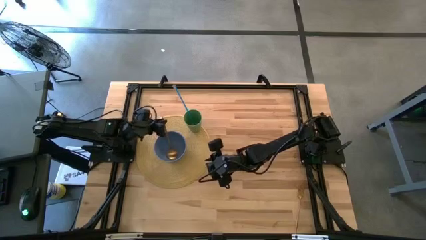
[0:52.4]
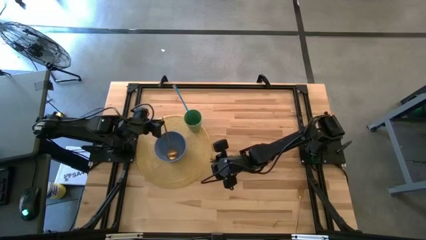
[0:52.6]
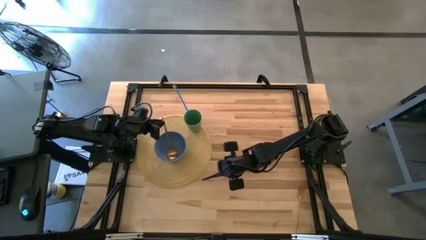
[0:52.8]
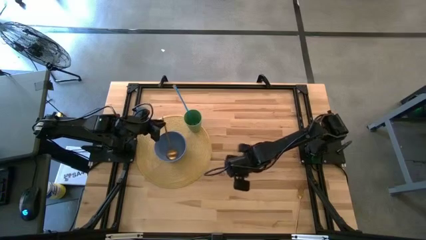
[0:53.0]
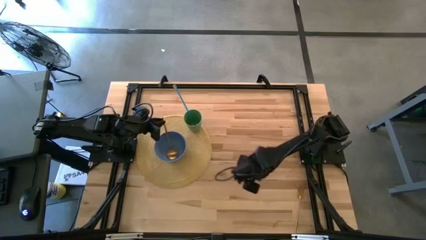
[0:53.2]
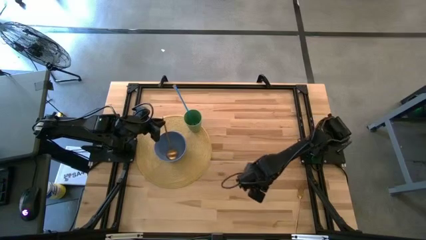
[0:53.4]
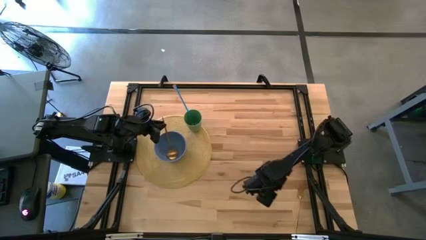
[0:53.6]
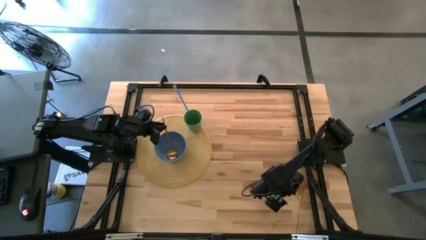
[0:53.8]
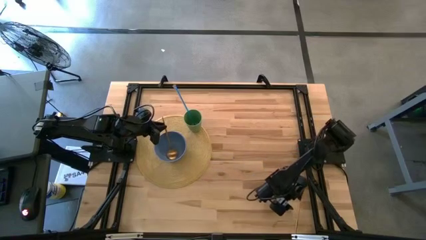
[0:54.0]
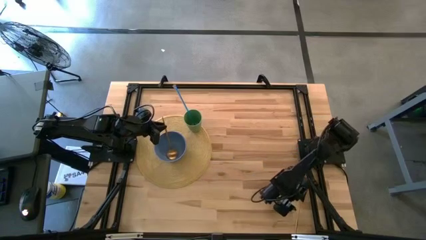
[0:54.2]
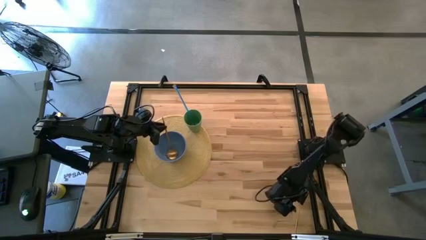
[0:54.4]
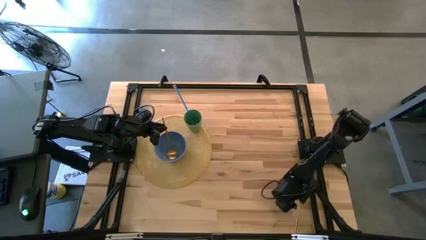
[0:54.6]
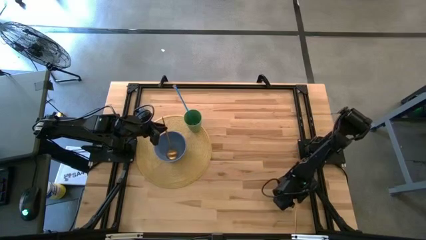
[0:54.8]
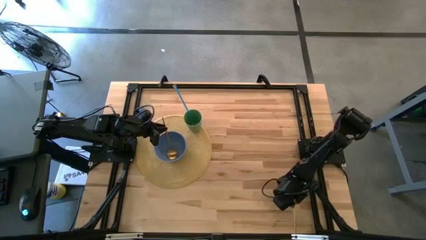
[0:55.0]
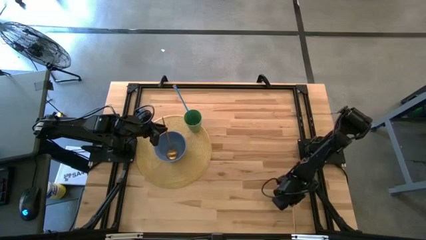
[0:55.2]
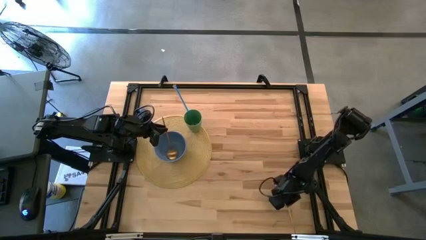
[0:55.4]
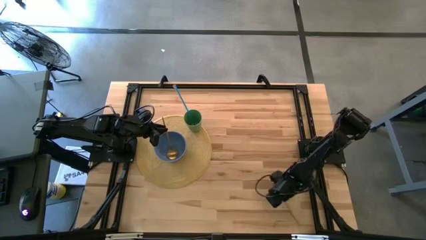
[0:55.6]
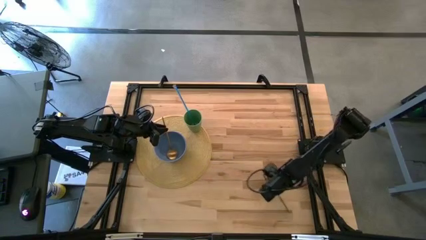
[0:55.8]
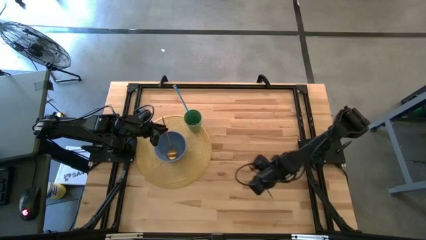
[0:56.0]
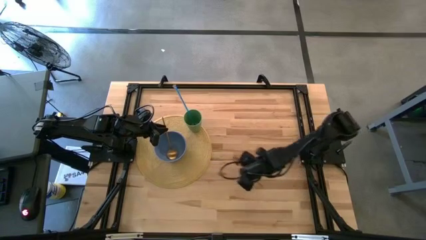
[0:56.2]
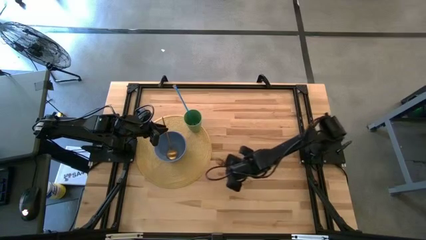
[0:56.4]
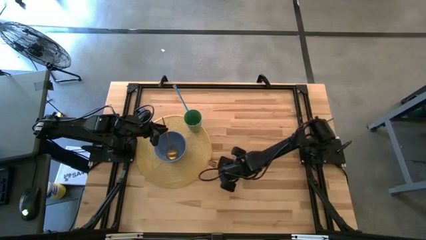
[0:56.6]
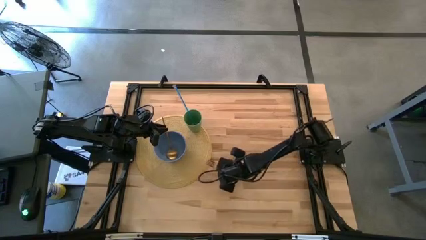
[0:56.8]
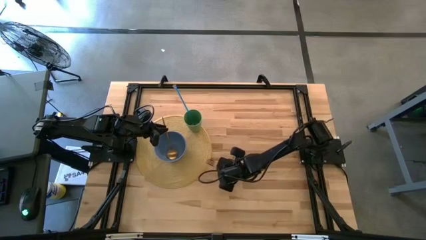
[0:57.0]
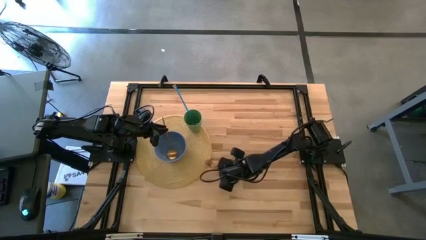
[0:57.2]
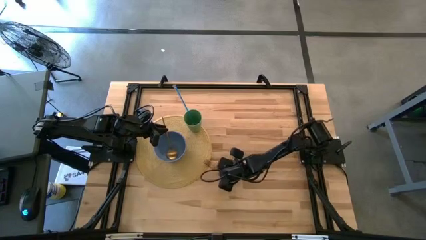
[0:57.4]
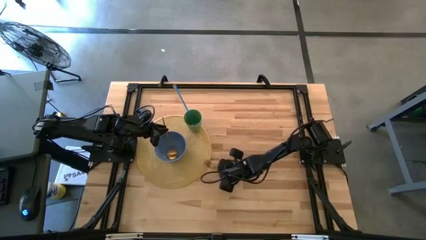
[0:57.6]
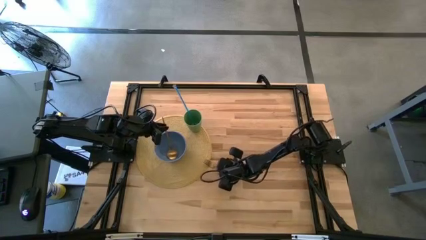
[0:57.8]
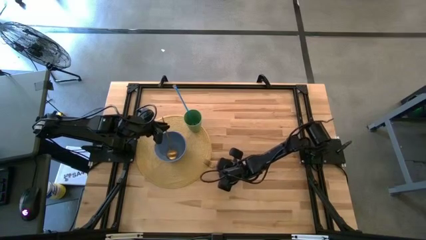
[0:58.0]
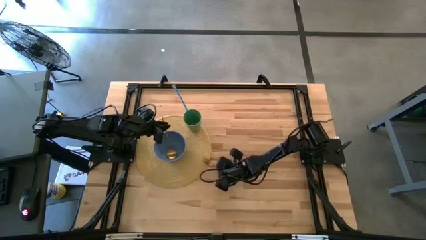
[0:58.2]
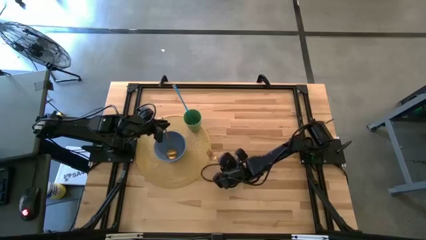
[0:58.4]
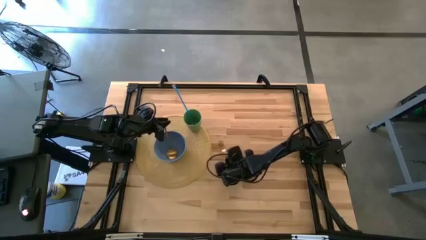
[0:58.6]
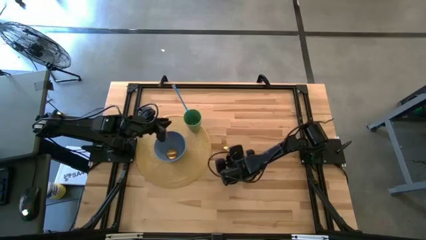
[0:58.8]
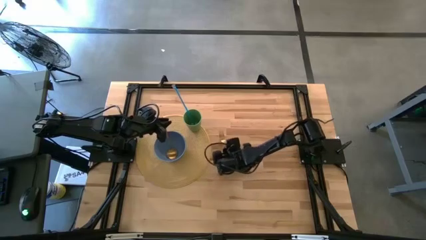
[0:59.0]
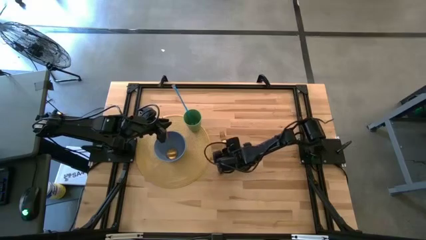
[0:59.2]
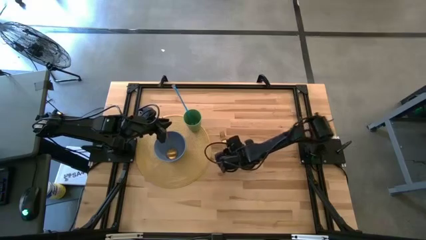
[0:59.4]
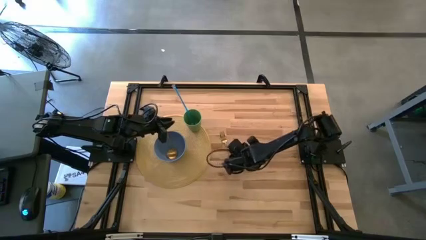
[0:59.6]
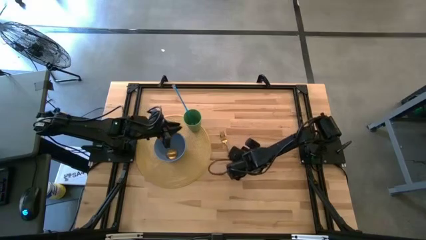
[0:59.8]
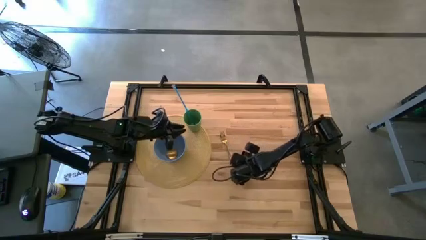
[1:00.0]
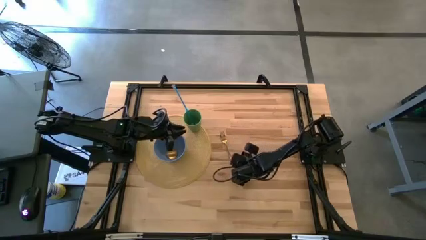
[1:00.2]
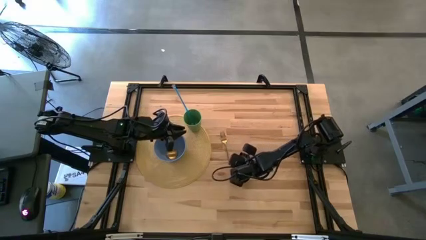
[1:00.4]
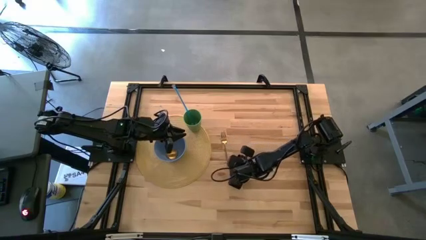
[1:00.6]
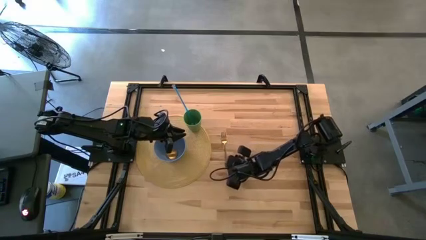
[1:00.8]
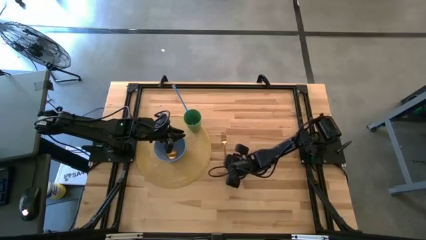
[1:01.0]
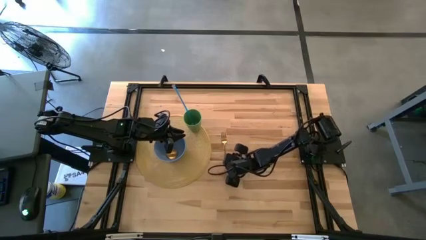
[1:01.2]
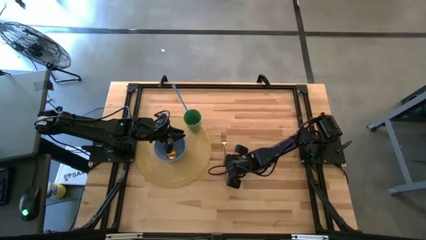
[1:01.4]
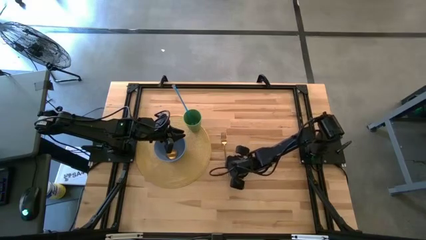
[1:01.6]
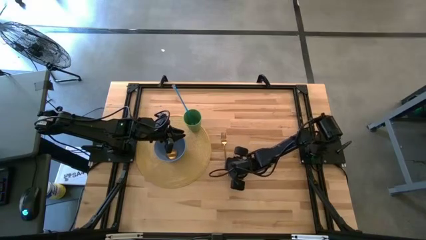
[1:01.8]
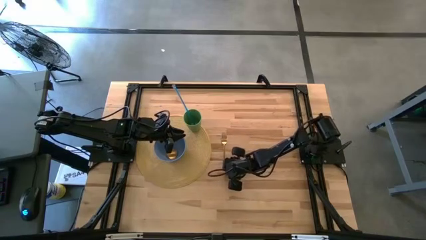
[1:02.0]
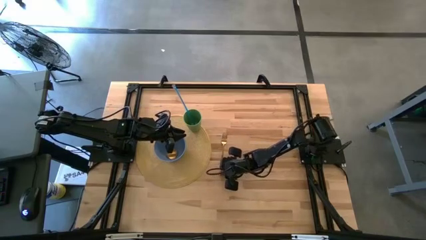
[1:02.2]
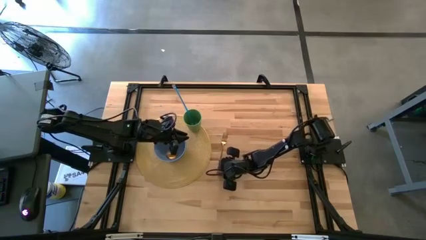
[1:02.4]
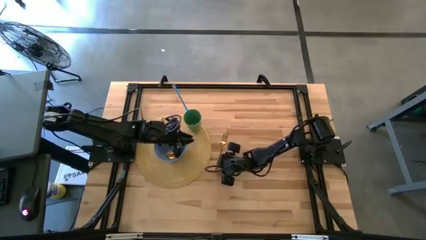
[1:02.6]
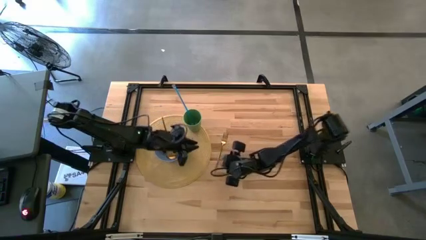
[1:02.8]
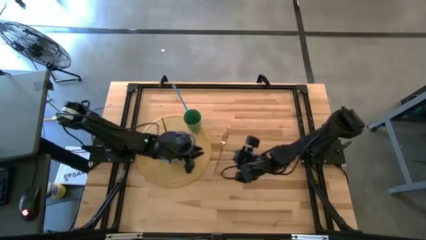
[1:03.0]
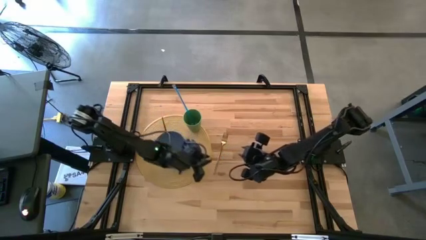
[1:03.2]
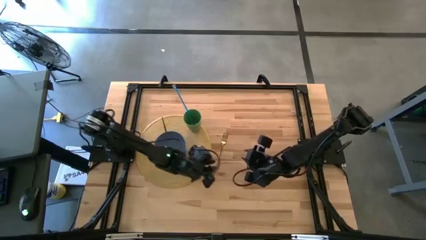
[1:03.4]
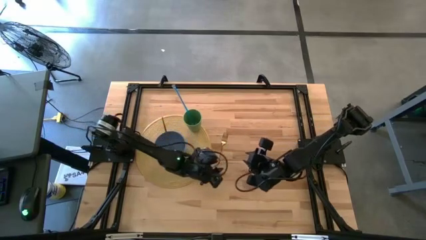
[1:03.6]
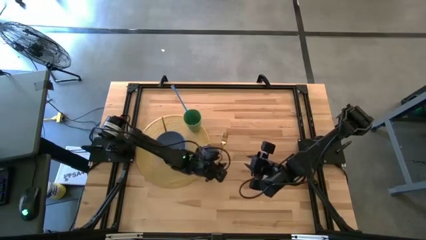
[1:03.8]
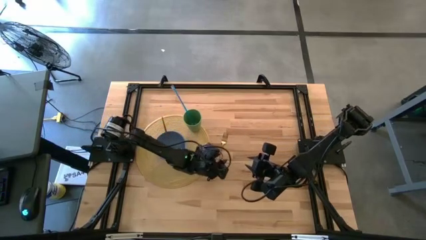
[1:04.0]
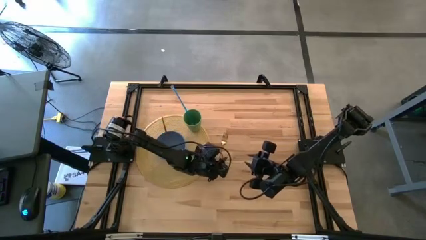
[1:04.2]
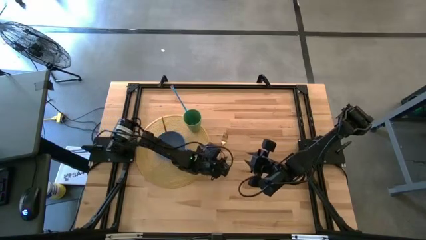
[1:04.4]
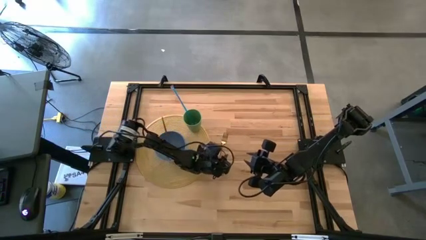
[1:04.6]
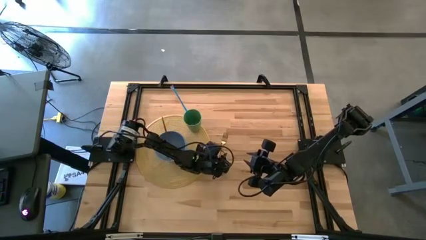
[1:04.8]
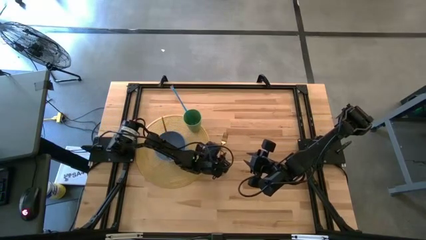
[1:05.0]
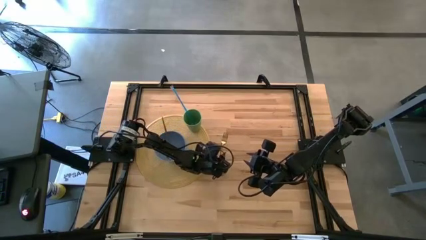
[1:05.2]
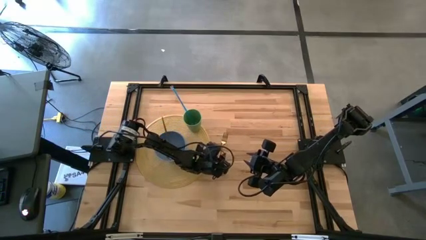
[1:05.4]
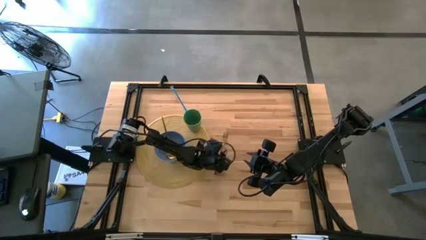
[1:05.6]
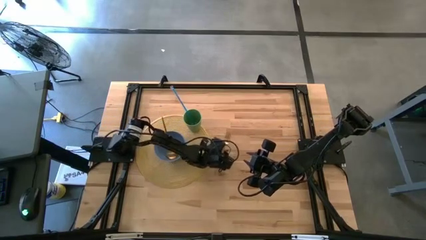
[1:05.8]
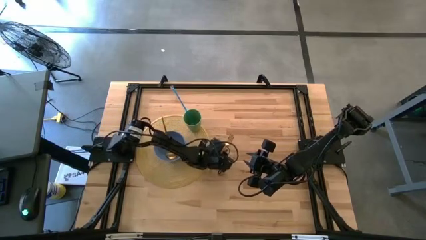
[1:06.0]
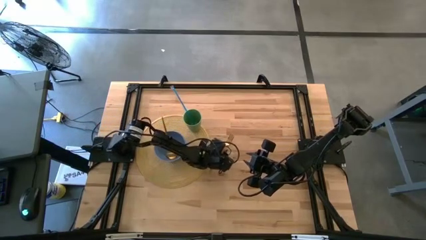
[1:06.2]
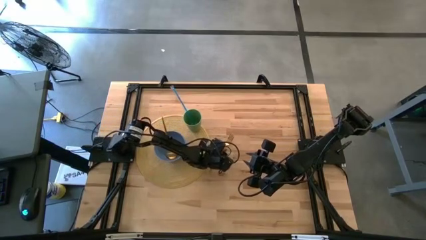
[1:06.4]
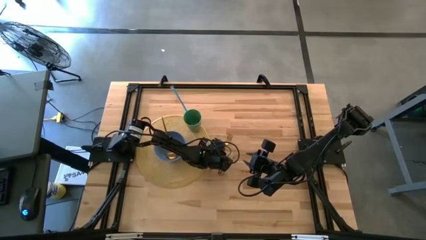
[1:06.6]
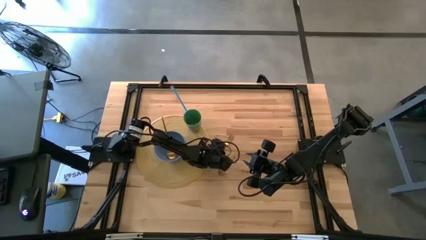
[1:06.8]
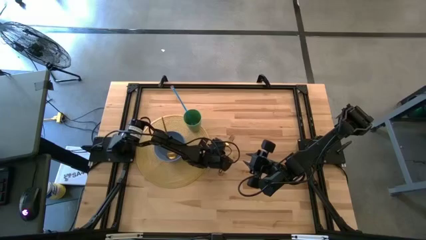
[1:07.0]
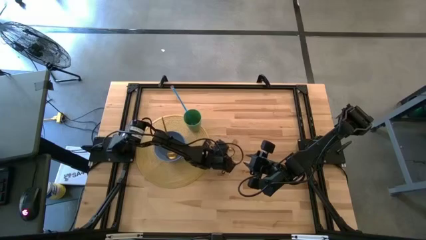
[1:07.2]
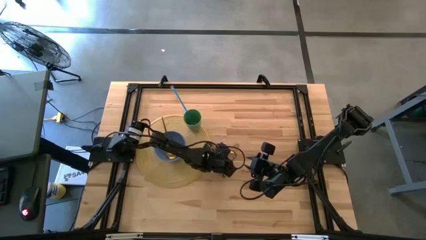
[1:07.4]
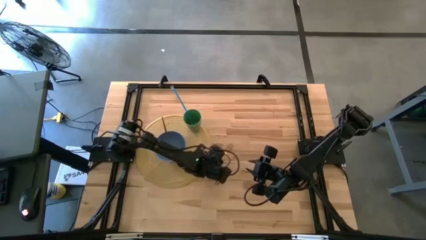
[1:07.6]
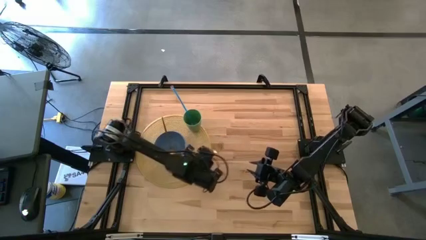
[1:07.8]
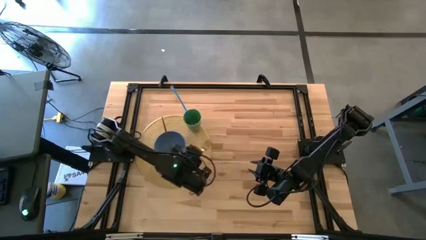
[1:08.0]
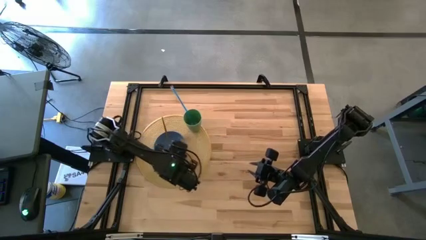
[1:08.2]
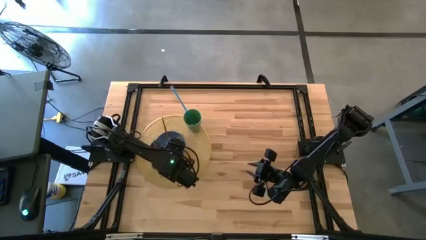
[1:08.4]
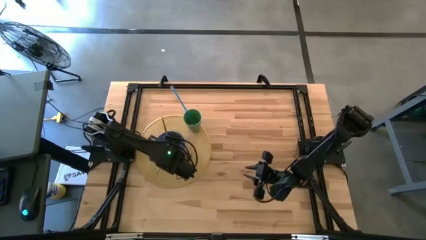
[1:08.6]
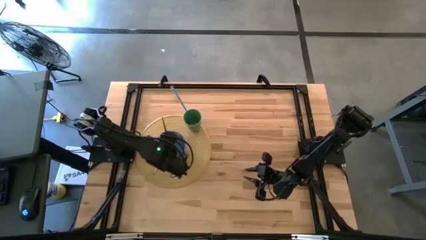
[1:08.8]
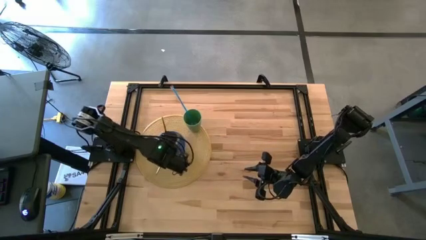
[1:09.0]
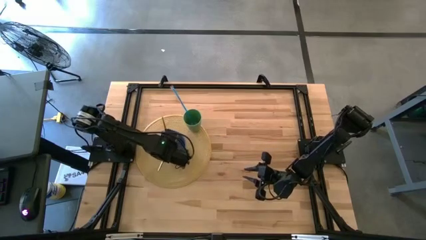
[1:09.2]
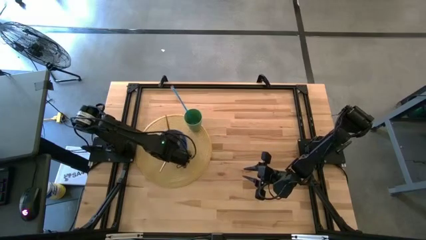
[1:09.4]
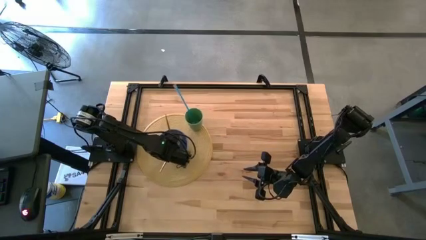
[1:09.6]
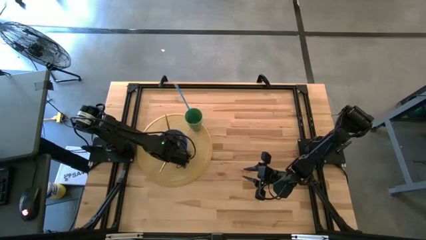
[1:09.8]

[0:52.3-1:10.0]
Task: Pick & Place Utensil
Put the gold fork into the blue bowl on the brown mat
